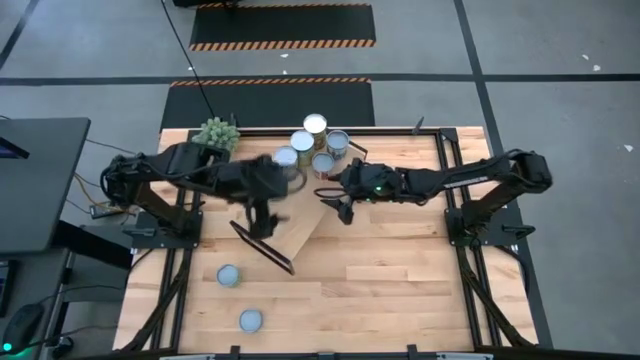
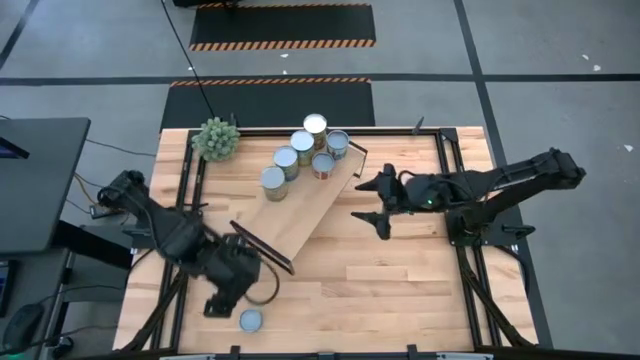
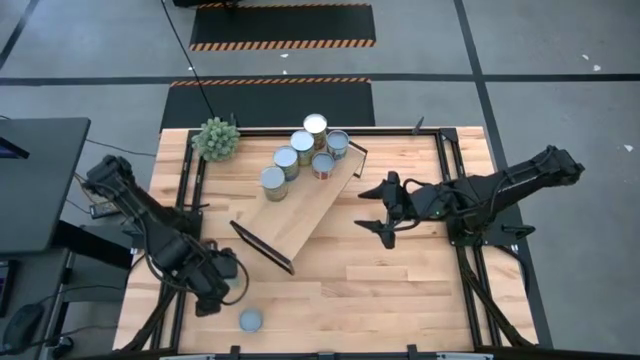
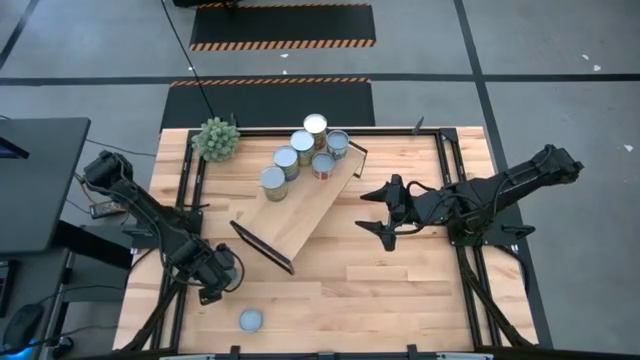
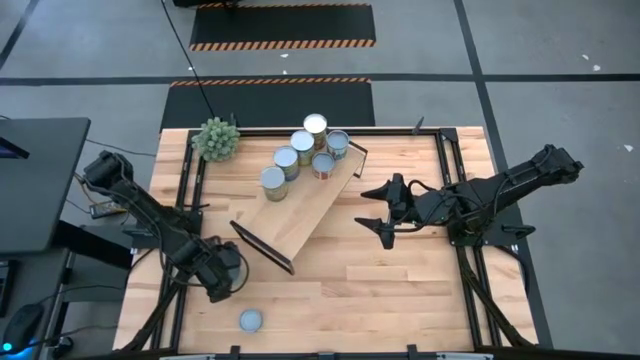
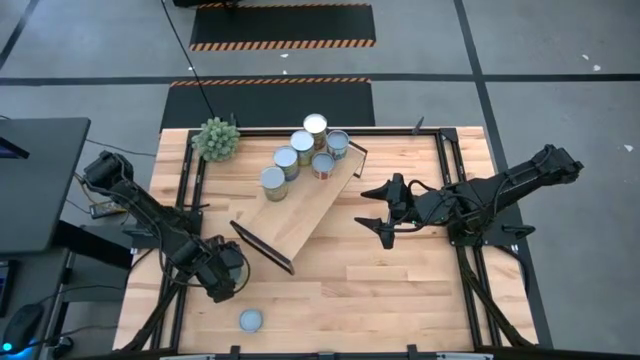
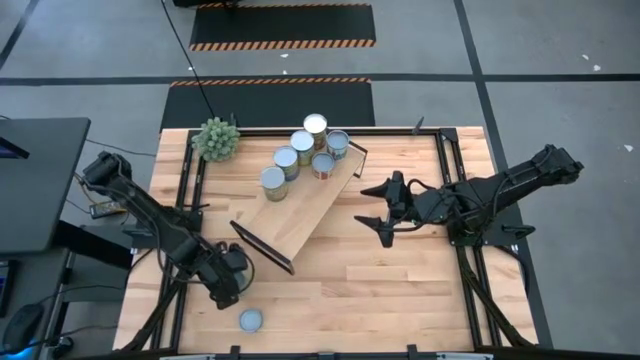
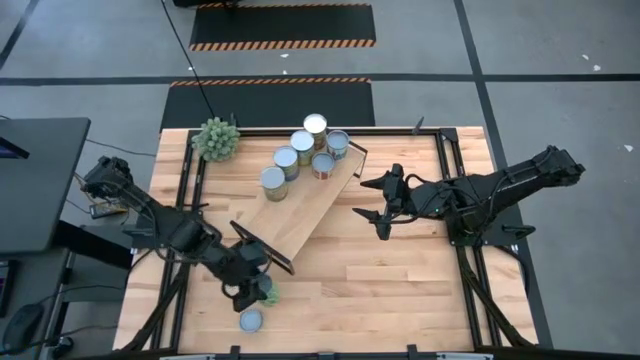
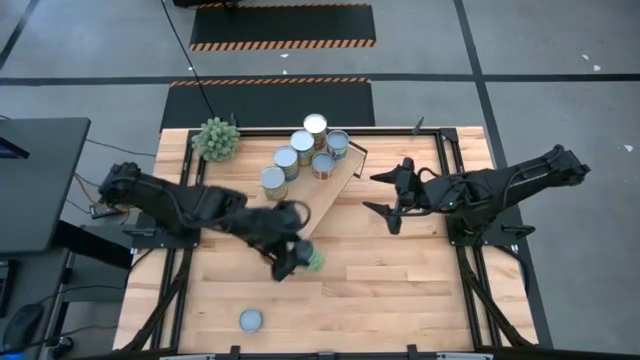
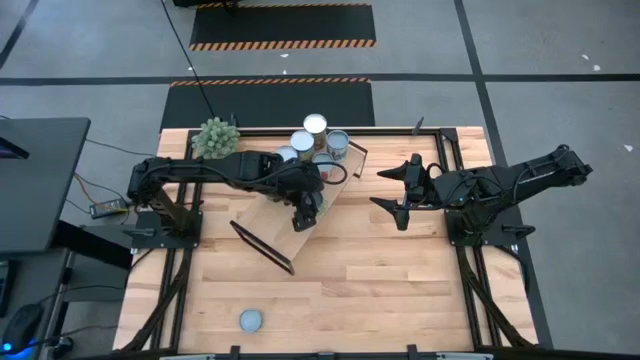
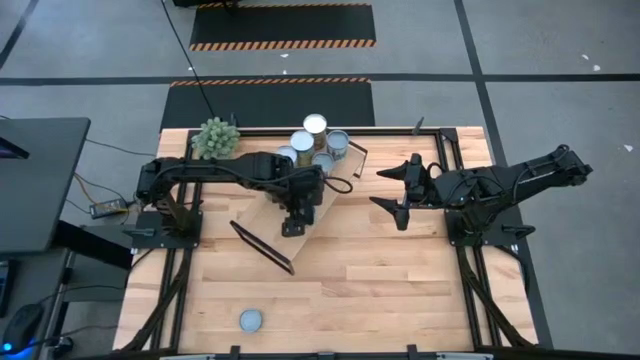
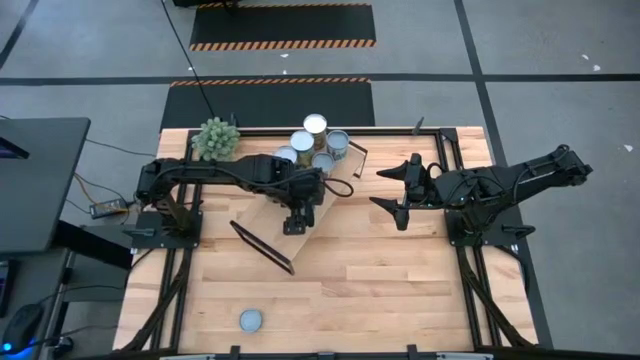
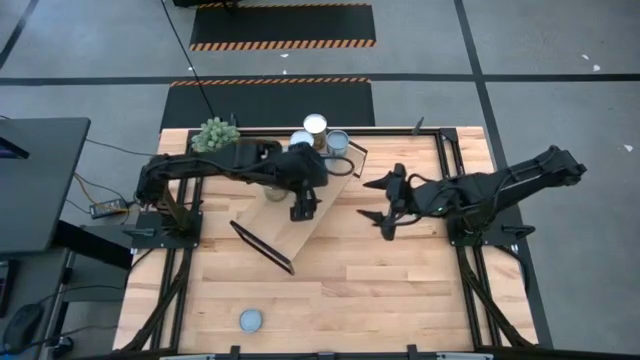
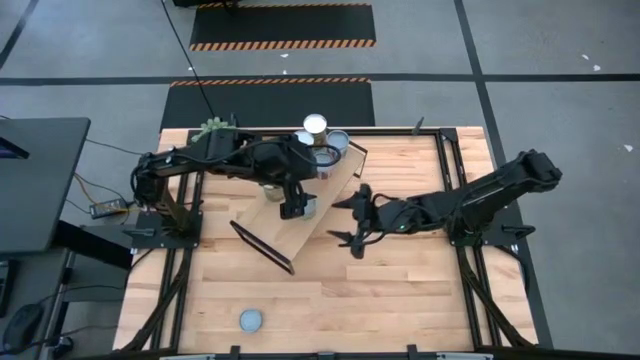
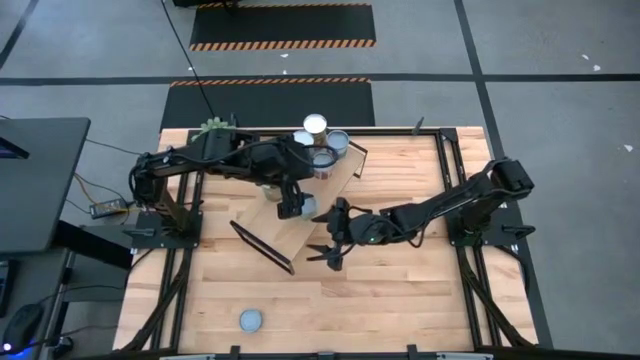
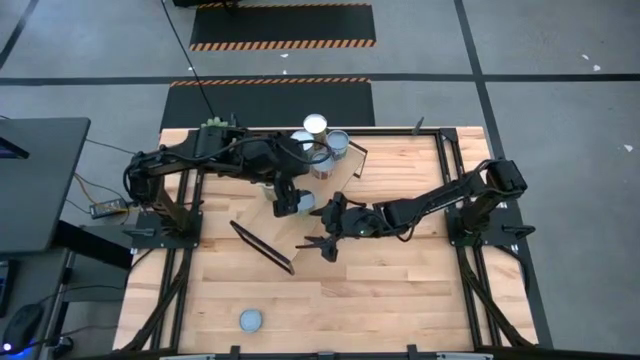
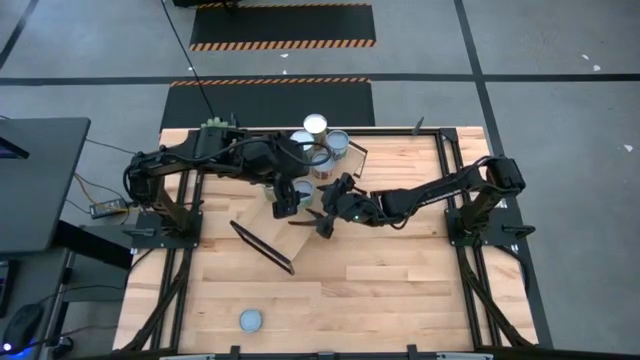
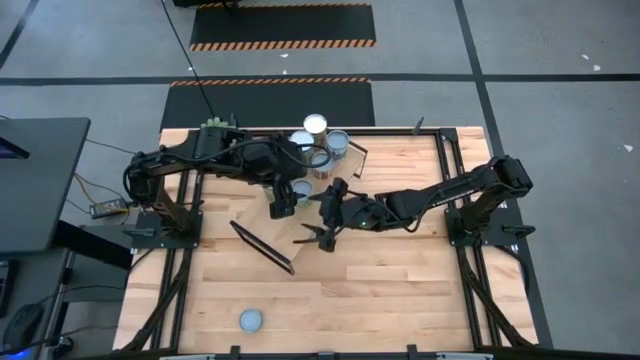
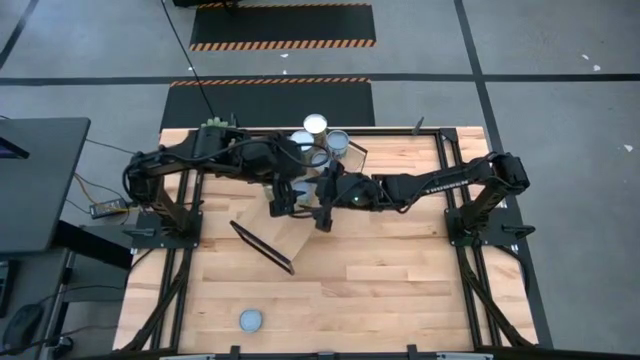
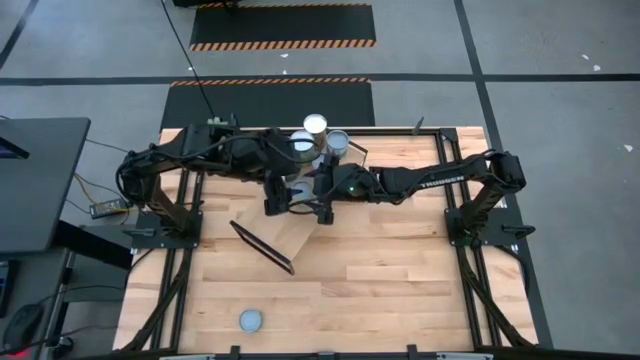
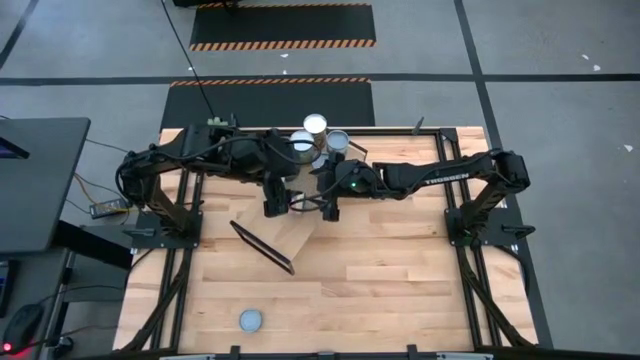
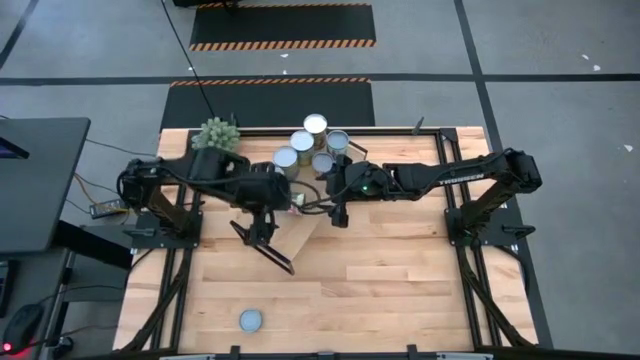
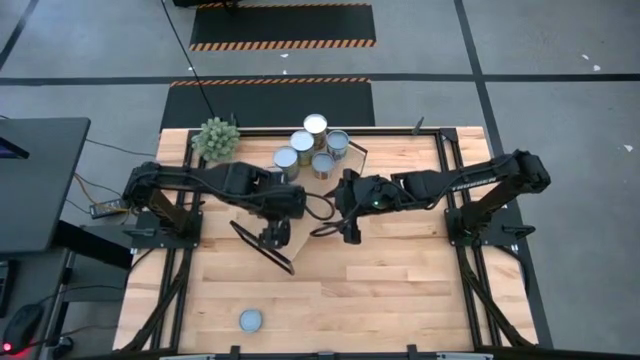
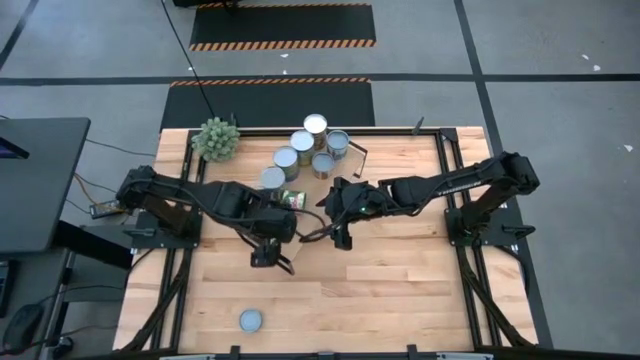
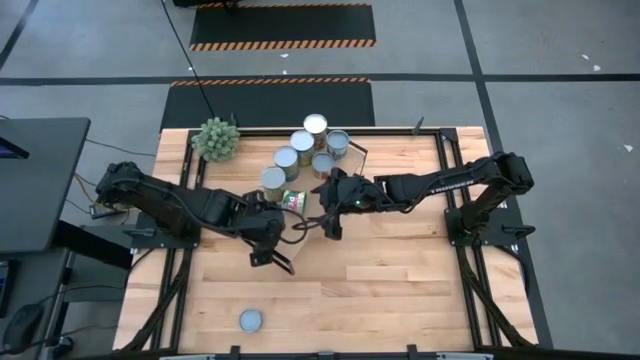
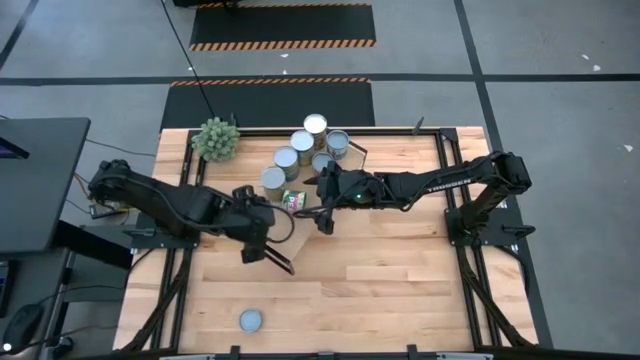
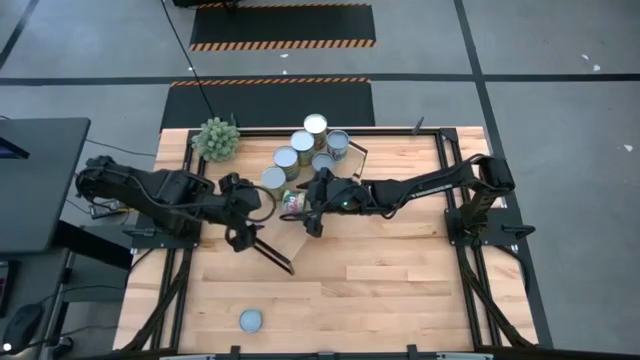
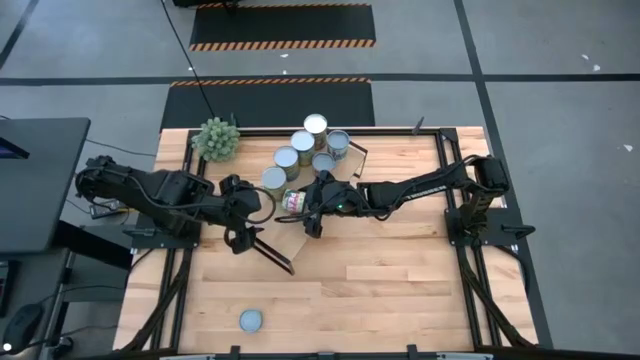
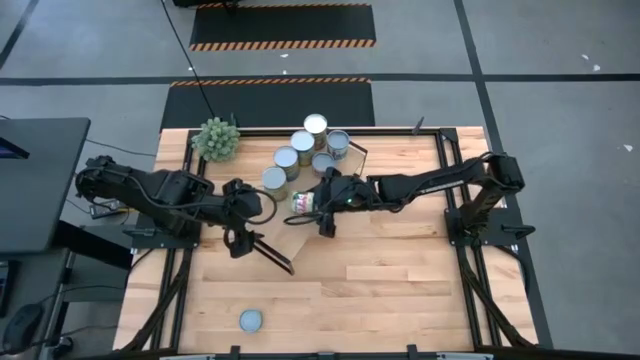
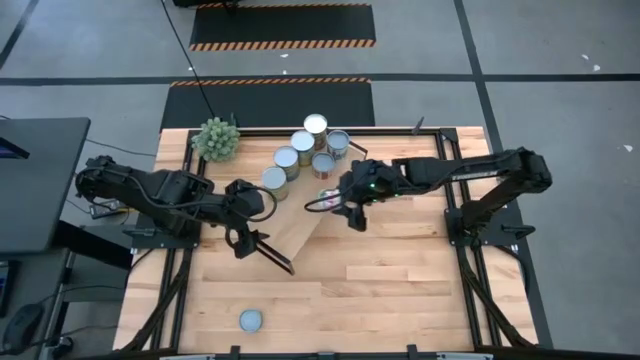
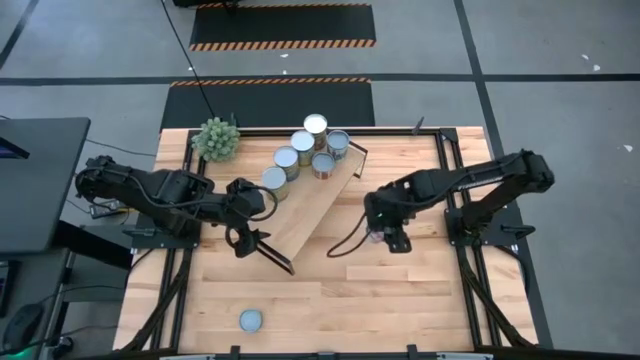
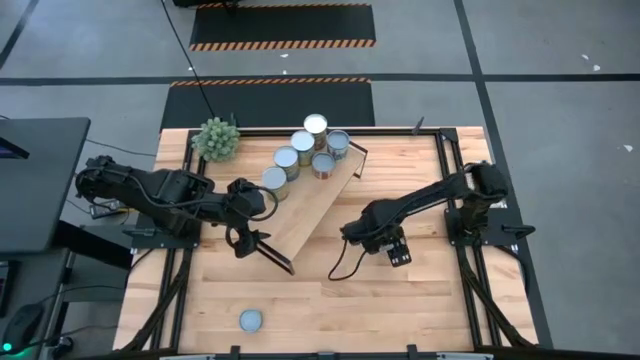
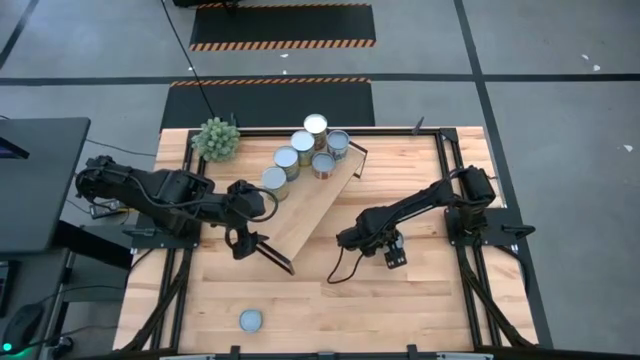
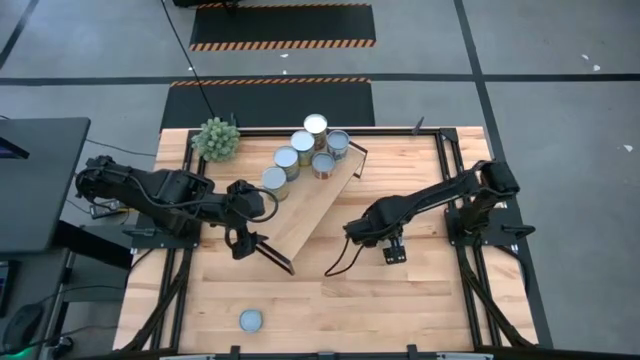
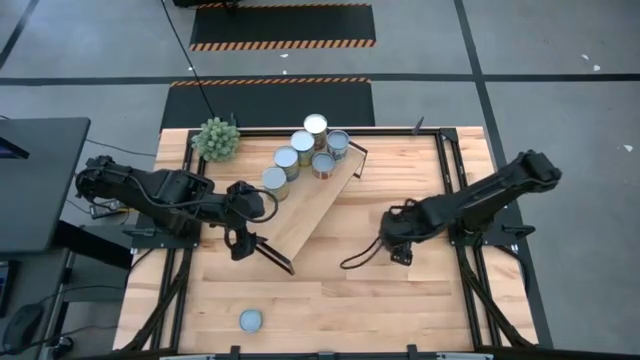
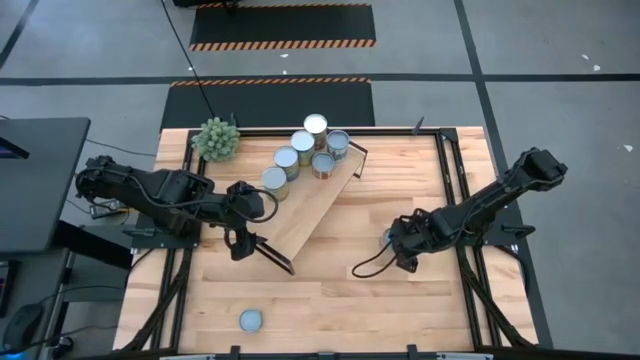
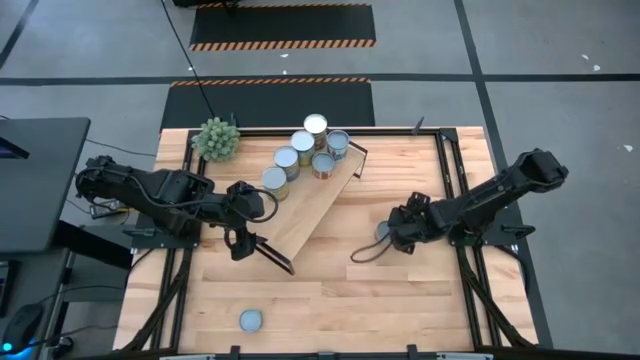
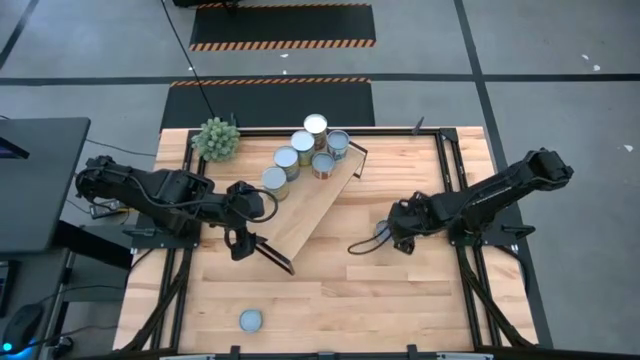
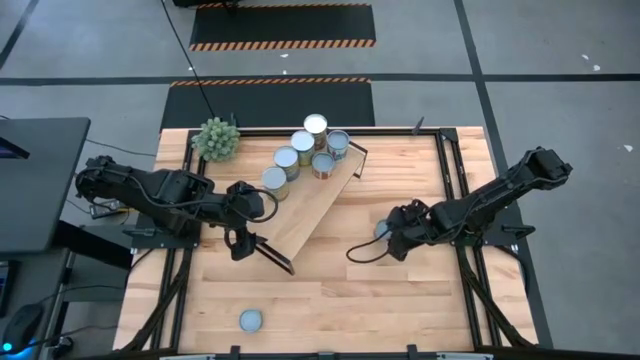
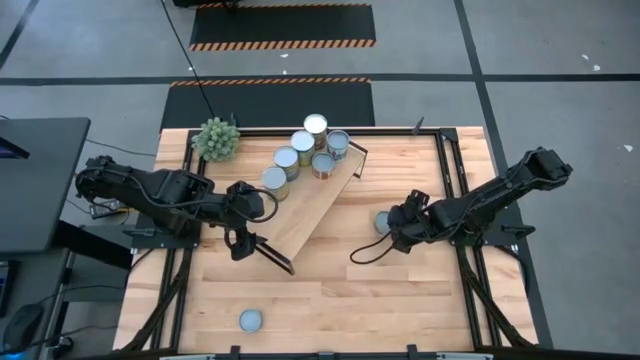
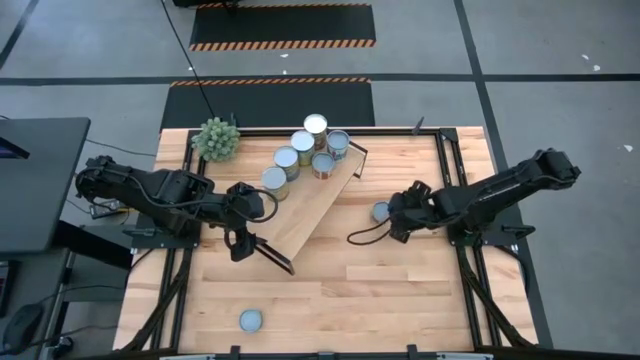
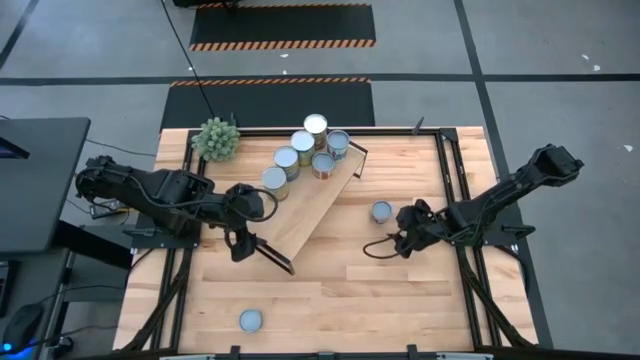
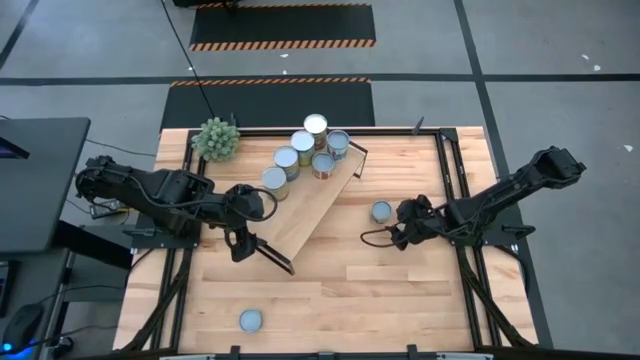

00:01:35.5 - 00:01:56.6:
Task: Pick and place cans onto a shelf
Put the canned green peas on the shelf

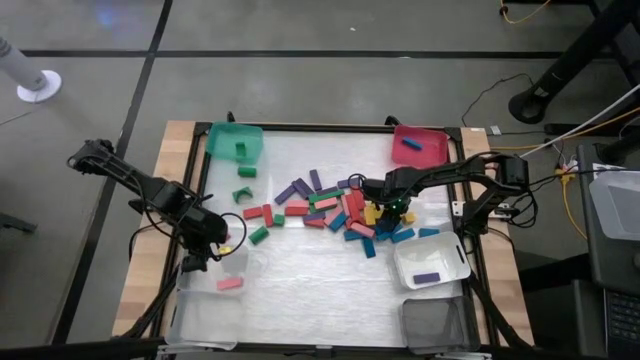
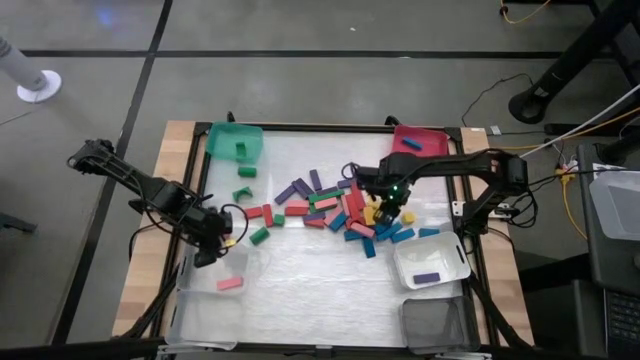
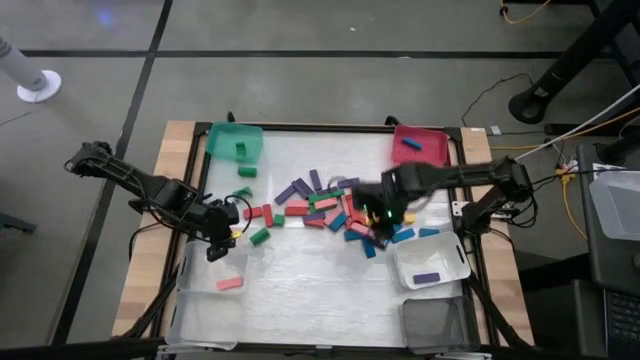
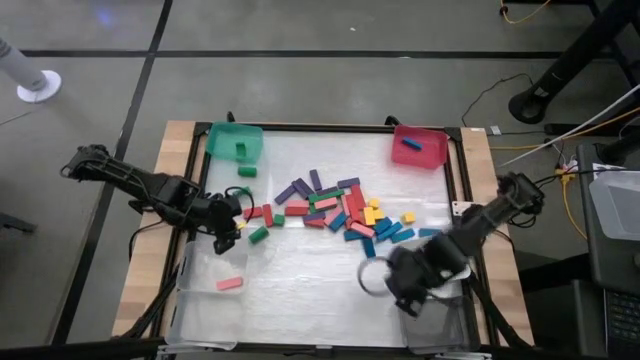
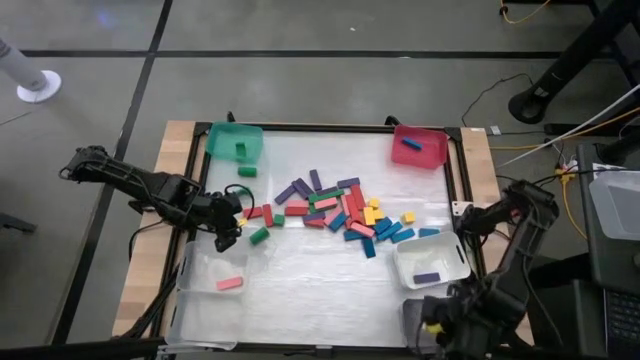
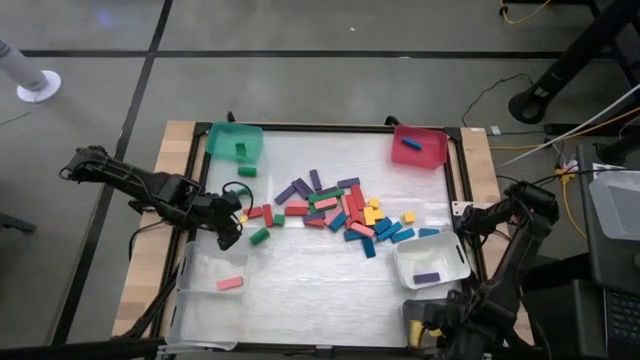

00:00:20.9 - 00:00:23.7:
Task: Sort blocks
Put the yellow block into the black bin
